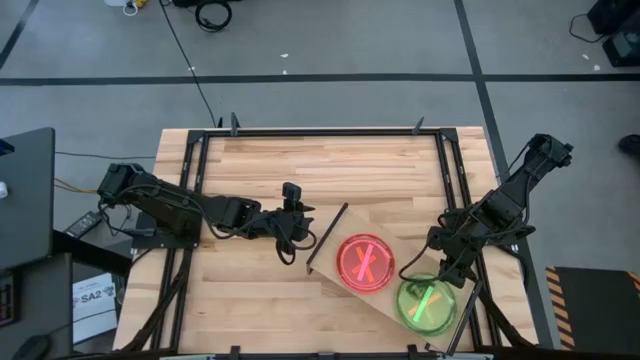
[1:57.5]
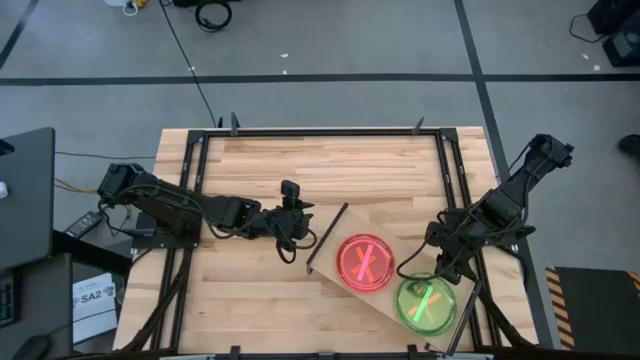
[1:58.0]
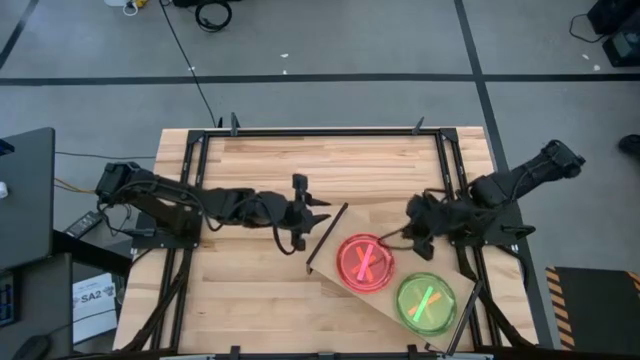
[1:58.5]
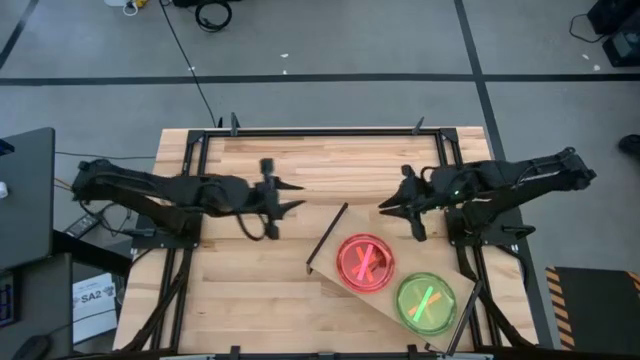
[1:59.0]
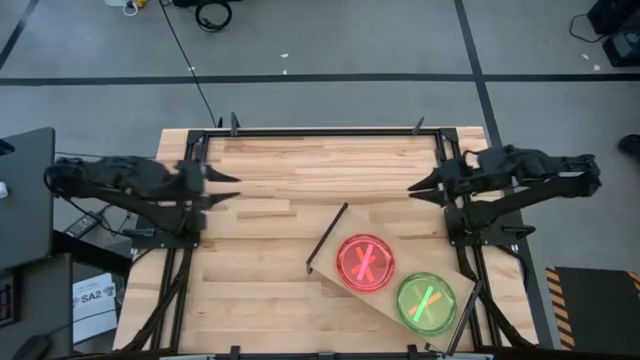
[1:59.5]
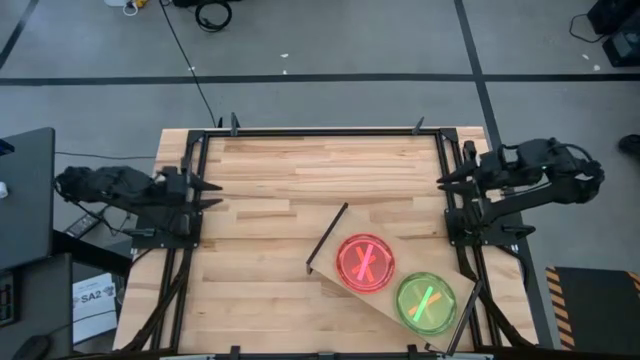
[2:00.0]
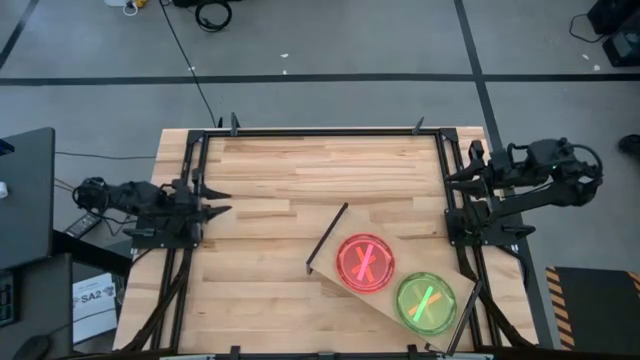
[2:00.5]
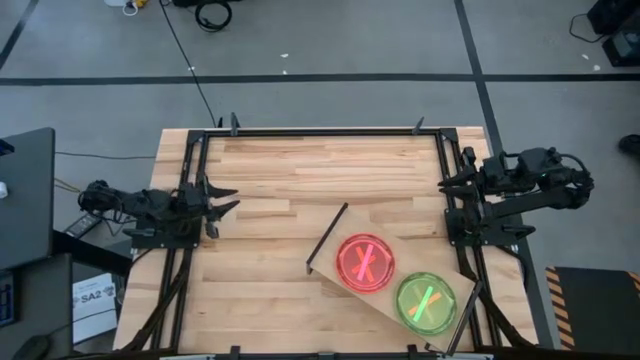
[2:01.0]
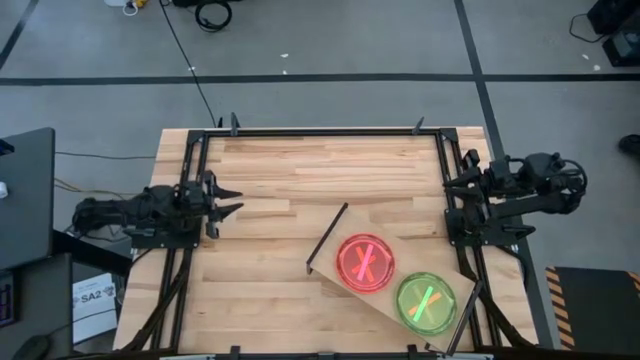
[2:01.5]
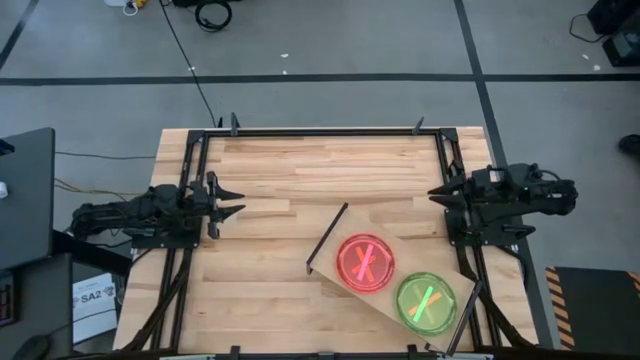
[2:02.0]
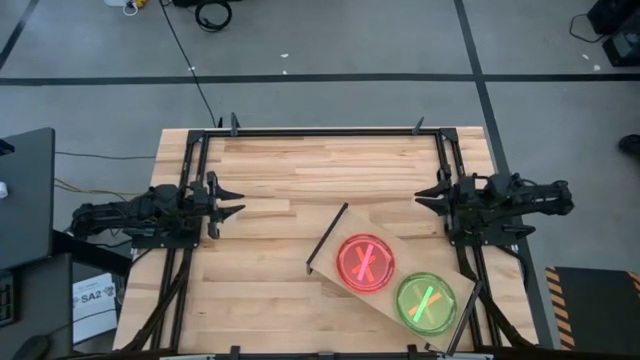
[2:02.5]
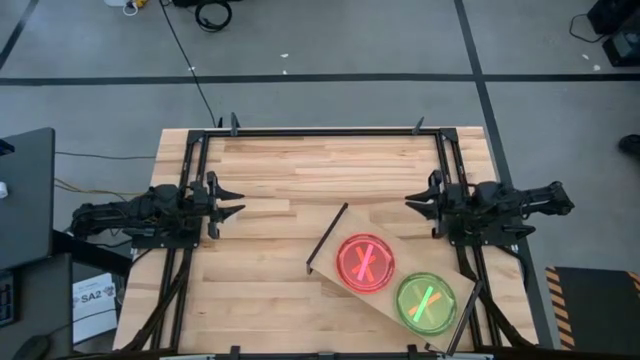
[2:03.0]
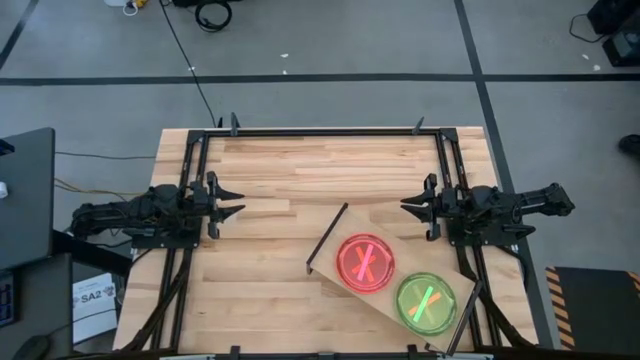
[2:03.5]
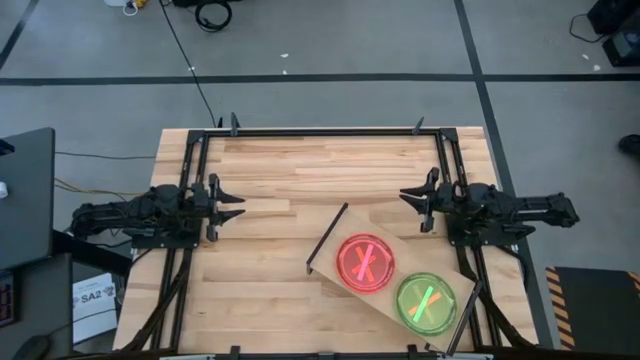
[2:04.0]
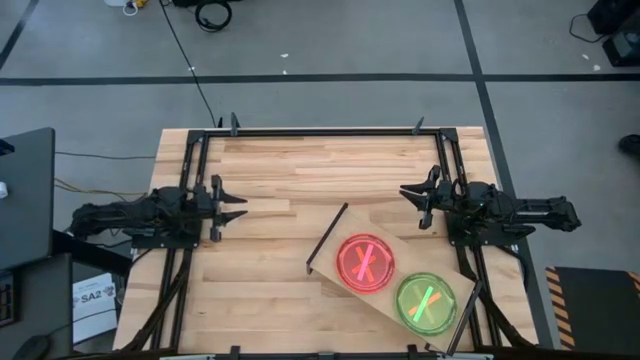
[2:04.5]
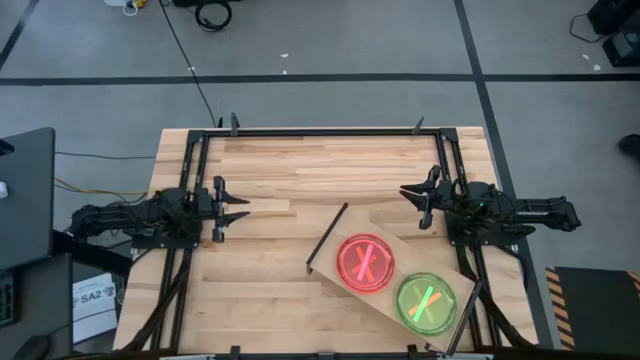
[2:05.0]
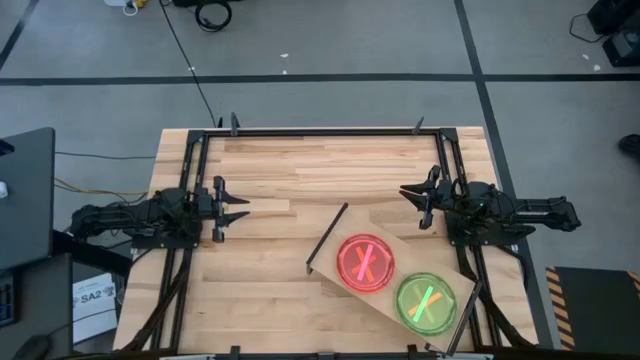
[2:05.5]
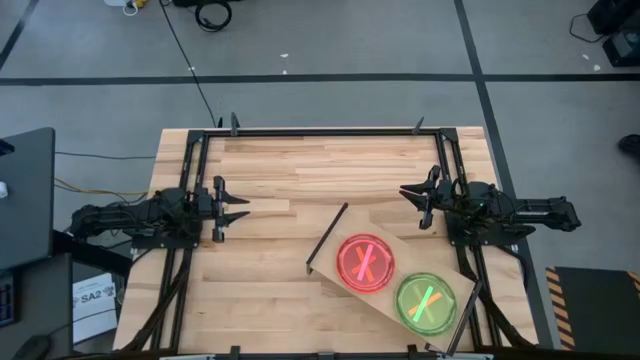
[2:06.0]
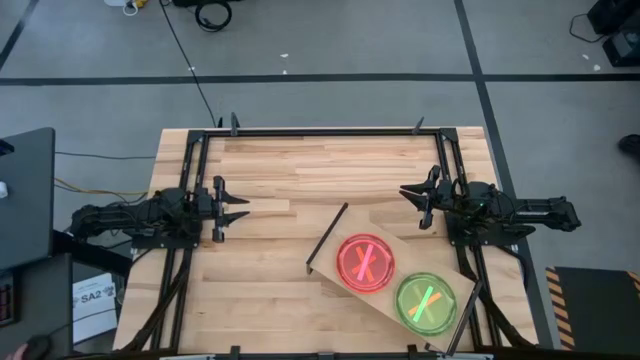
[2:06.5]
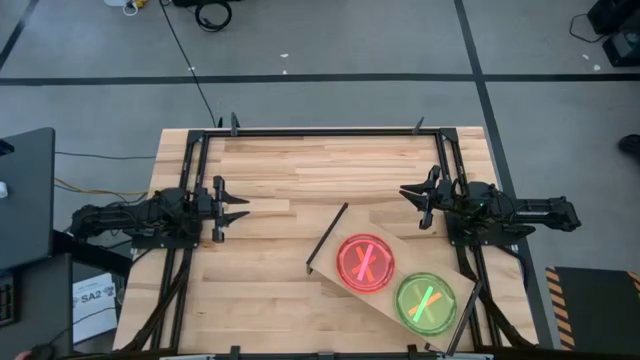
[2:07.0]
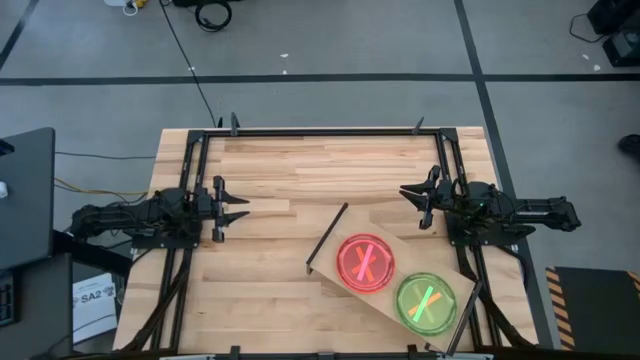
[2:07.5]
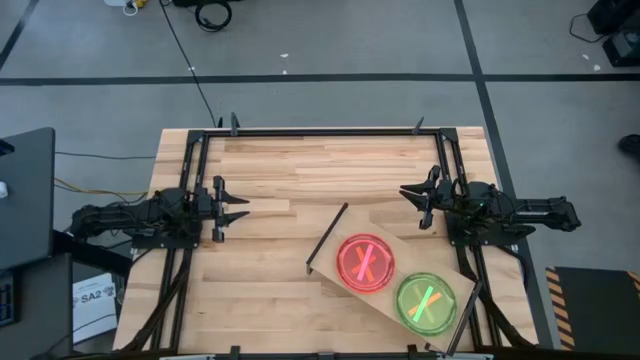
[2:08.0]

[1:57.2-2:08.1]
Task: Place and stack plates onto a shelf
Return to Home Position

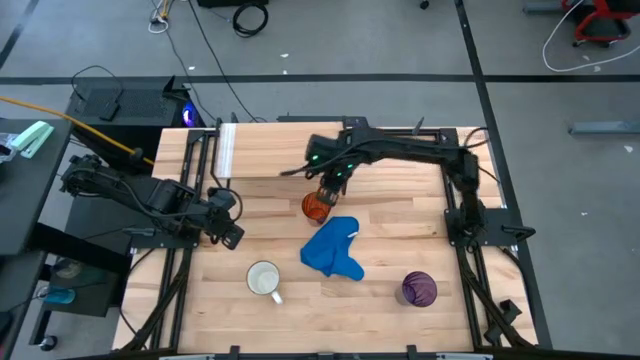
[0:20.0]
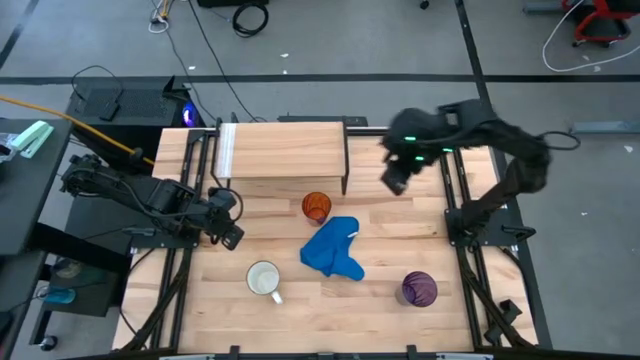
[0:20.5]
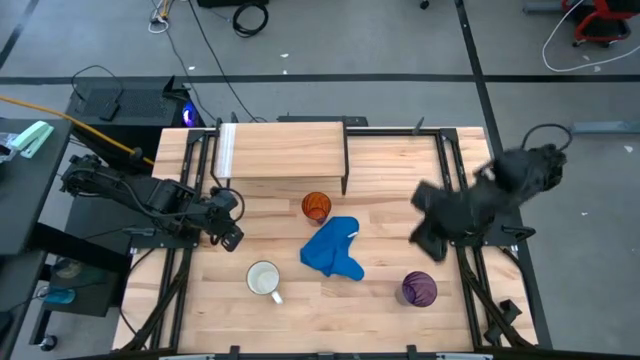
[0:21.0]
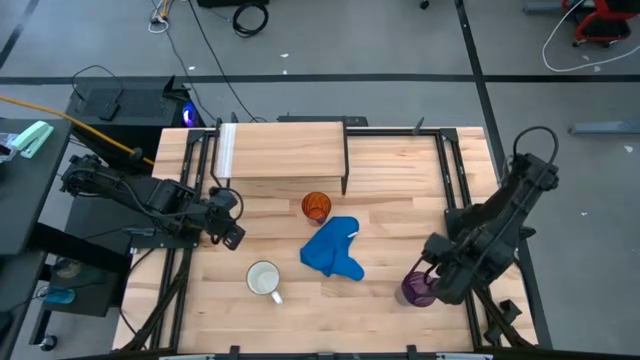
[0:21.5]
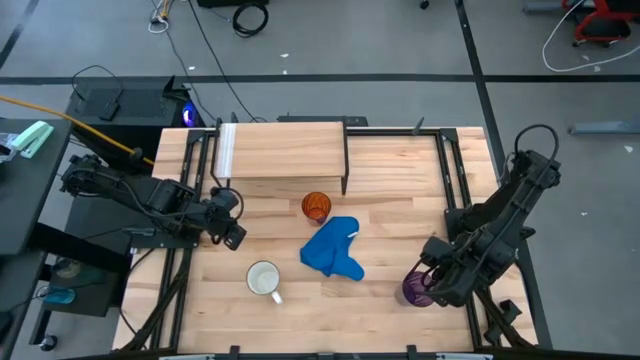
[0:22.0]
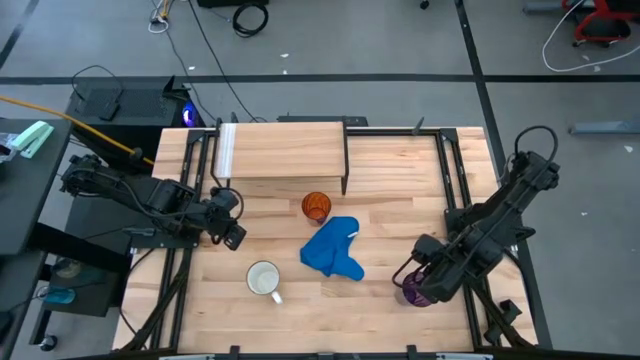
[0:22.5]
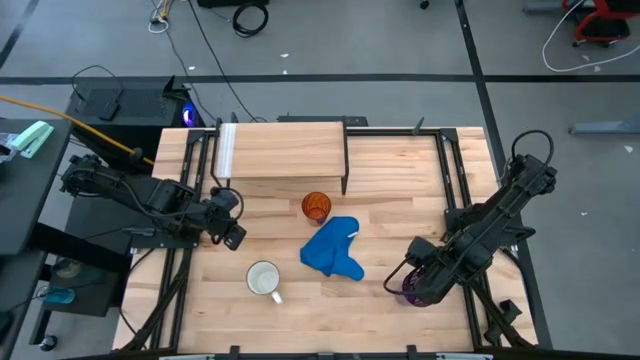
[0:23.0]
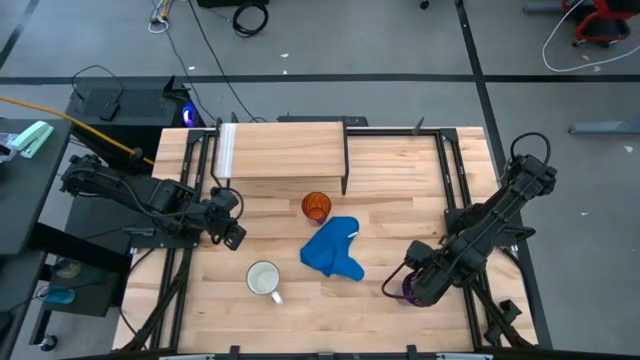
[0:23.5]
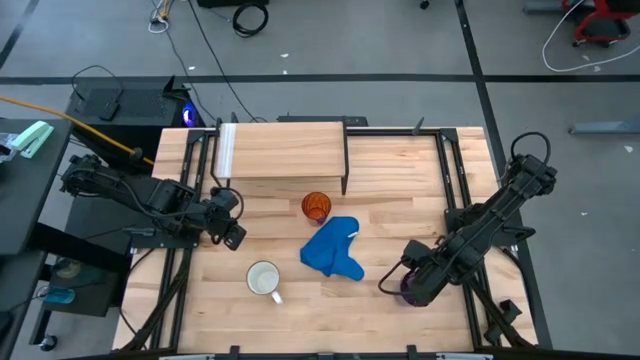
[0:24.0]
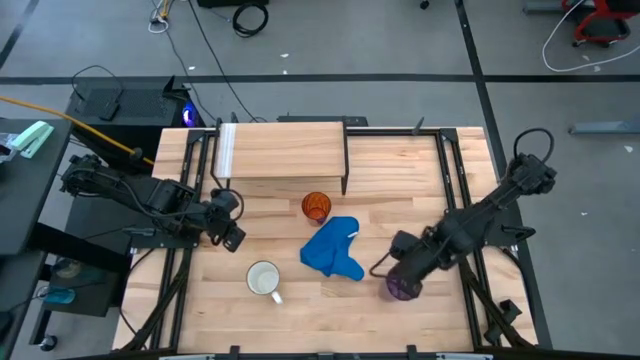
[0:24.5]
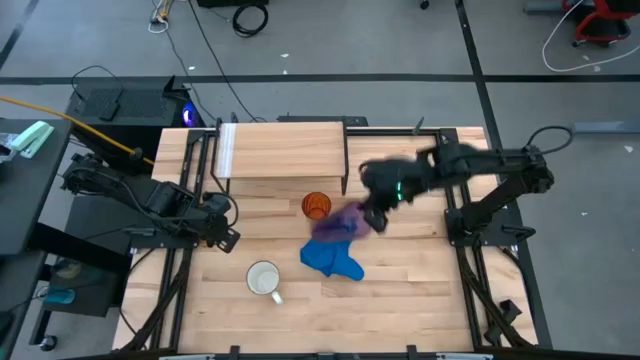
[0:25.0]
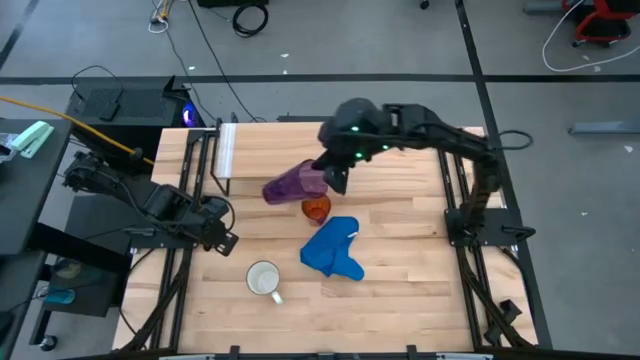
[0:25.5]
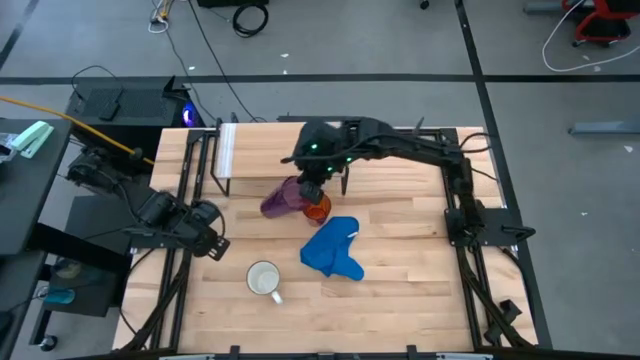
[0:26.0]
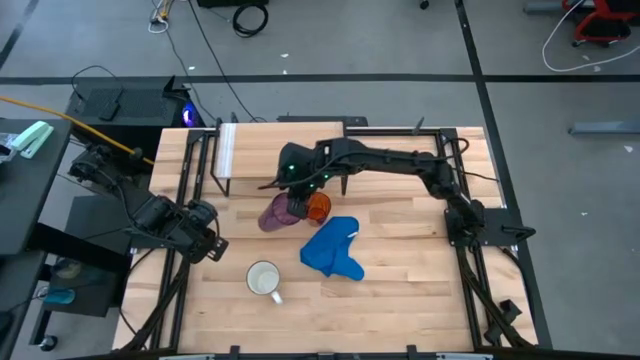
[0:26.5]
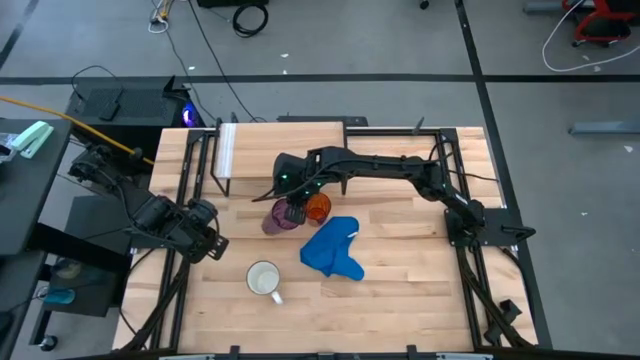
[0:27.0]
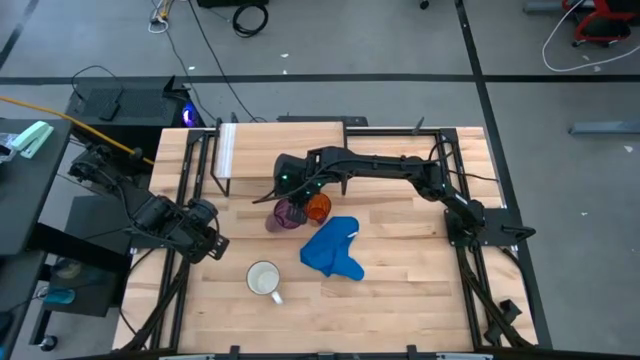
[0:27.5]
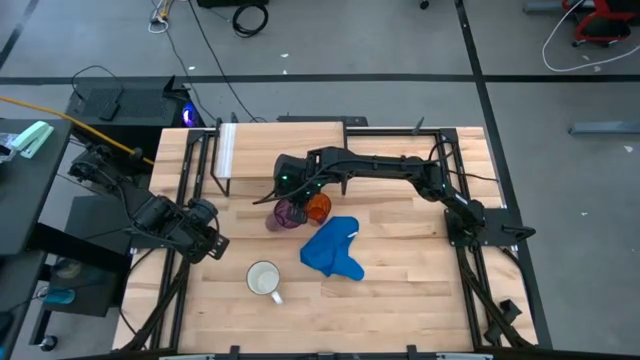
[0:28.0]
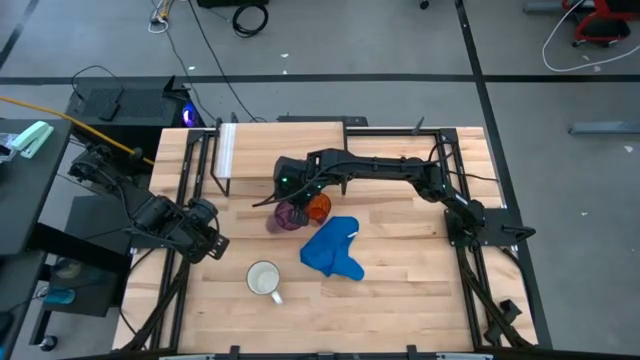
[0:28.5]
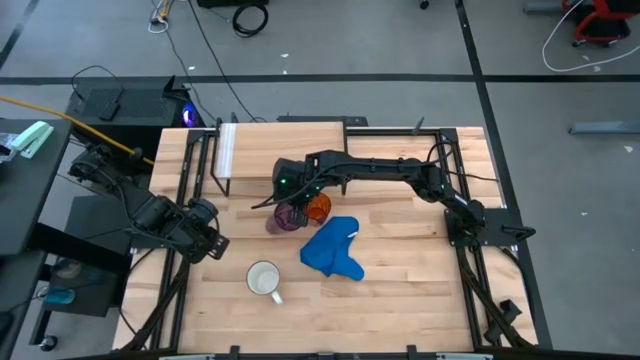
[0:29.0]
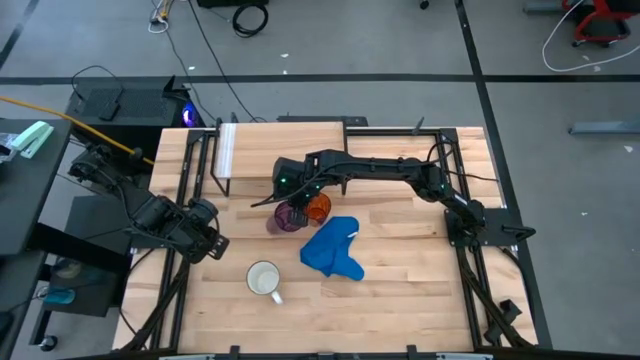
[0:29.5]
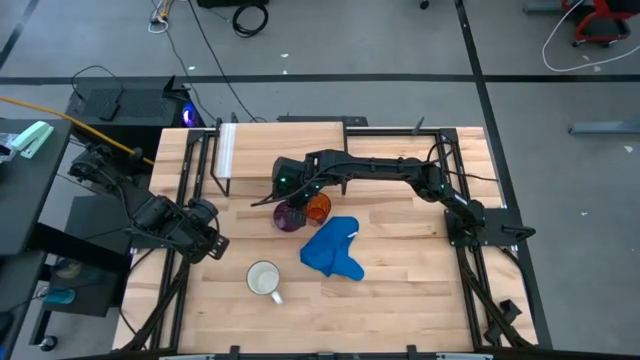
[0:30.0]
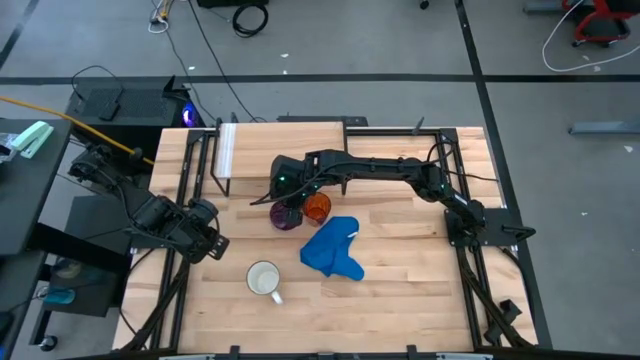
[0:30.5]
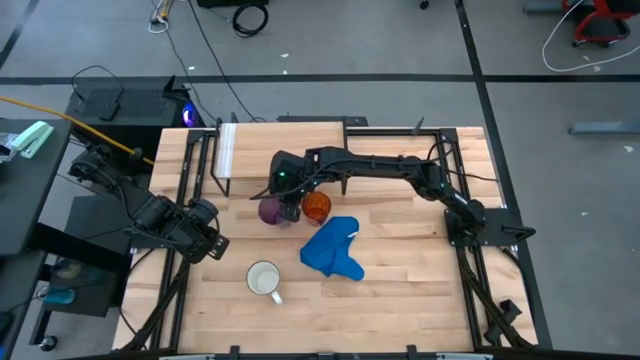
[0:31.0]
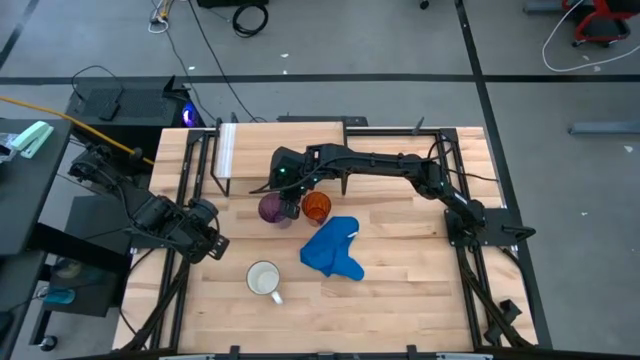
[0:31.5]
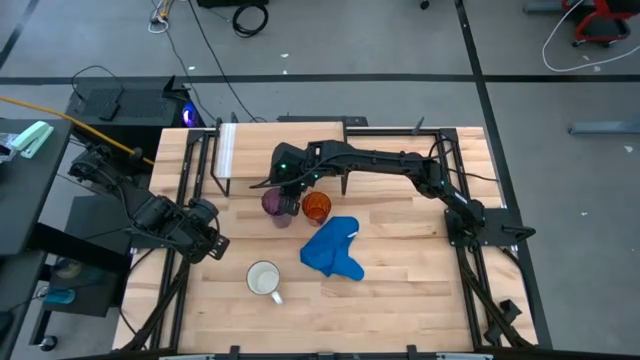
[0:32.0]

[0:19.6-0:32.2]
Task: Stack small to large cups/mugs on shelf
Move the violet glass to the center of the table
